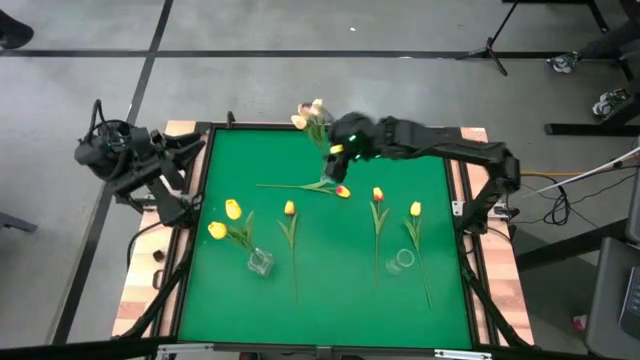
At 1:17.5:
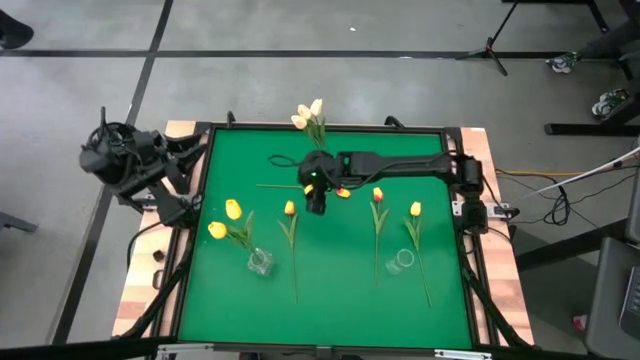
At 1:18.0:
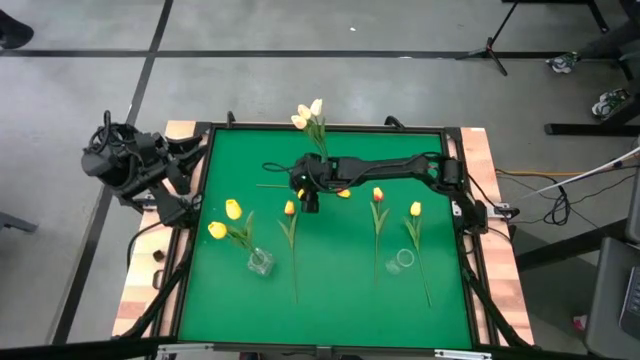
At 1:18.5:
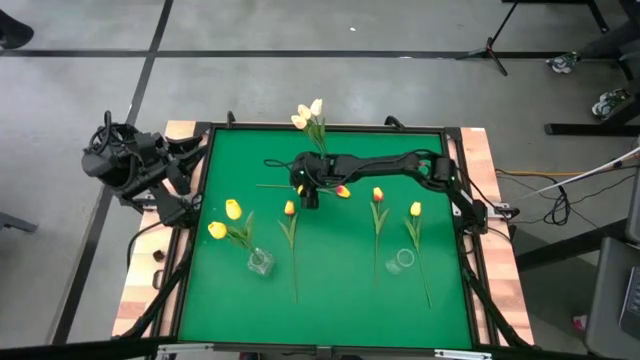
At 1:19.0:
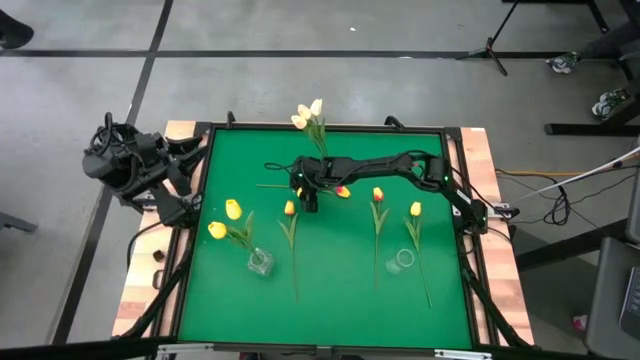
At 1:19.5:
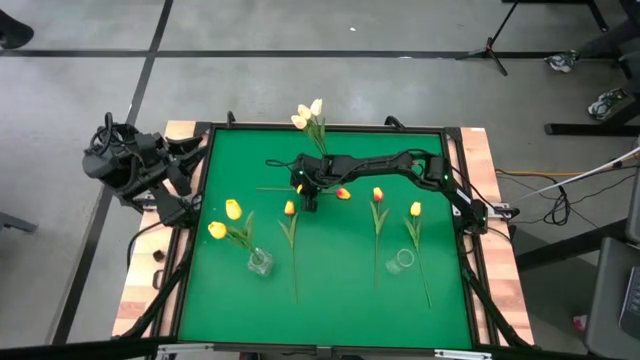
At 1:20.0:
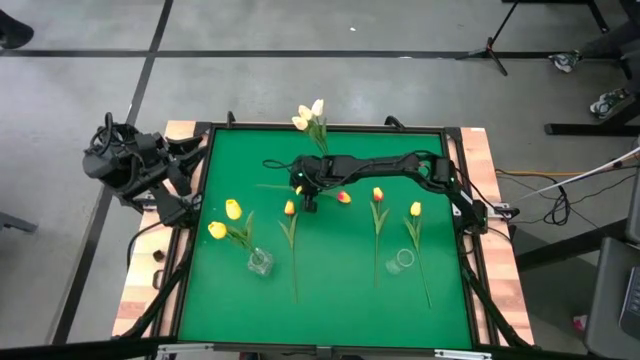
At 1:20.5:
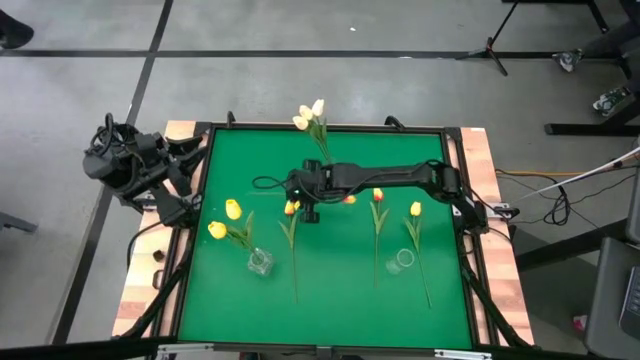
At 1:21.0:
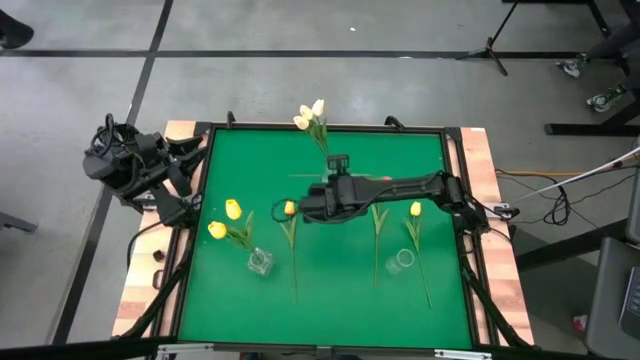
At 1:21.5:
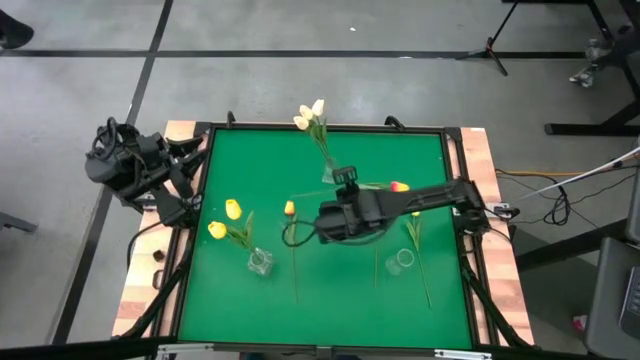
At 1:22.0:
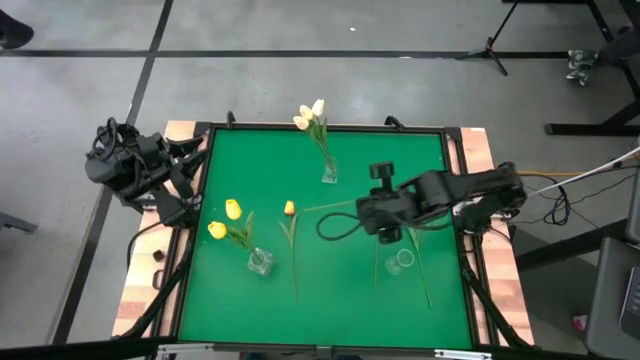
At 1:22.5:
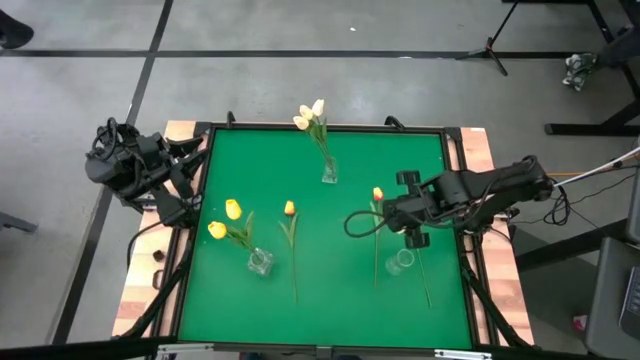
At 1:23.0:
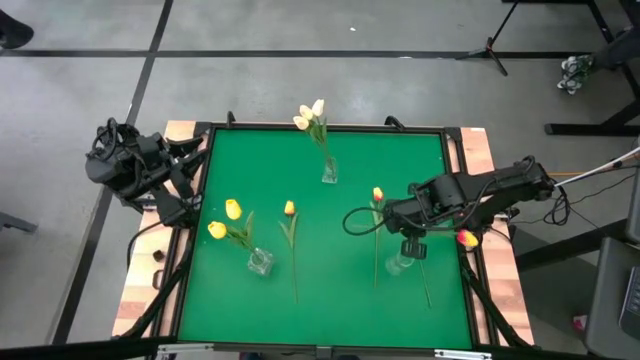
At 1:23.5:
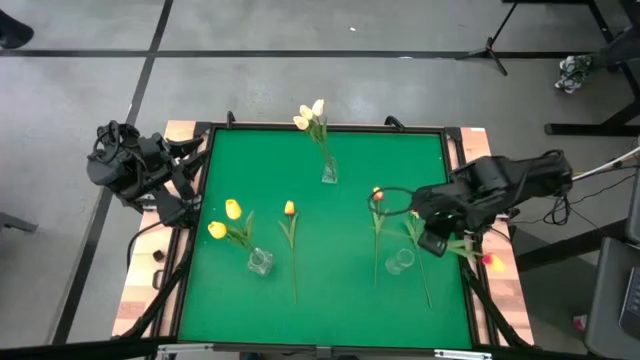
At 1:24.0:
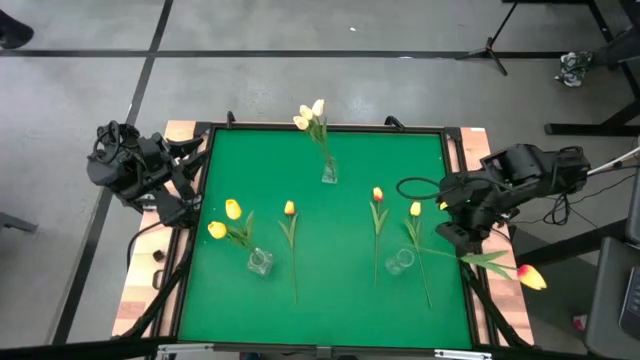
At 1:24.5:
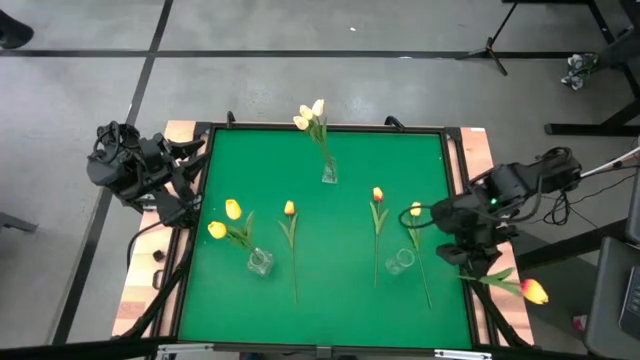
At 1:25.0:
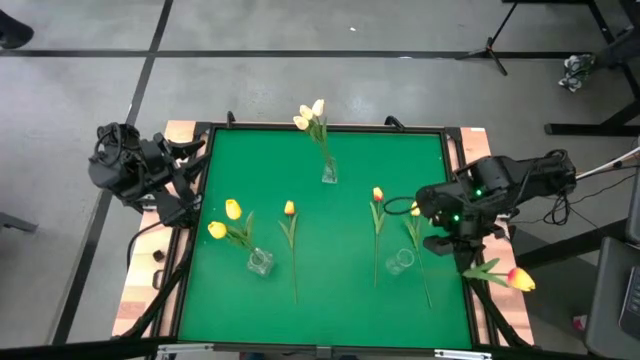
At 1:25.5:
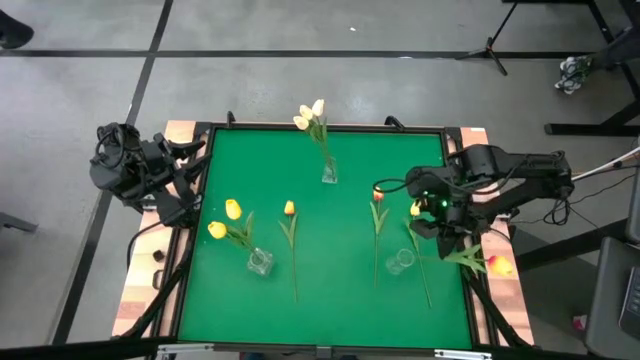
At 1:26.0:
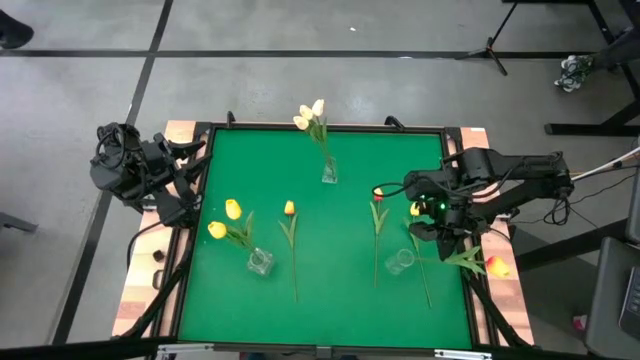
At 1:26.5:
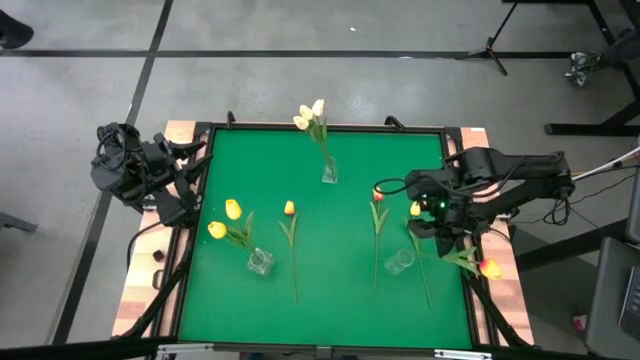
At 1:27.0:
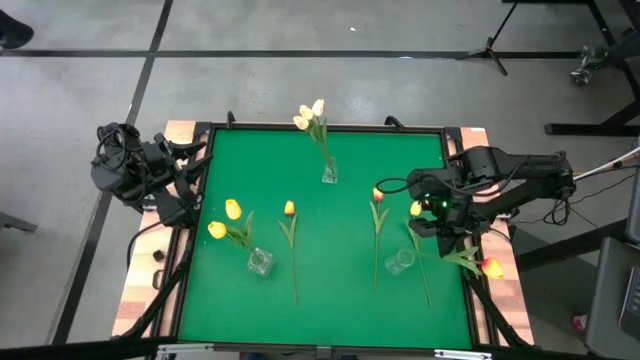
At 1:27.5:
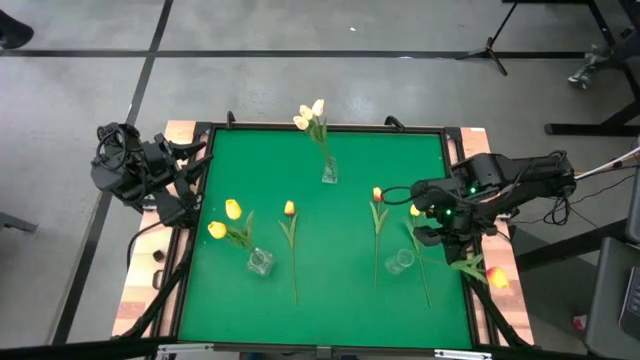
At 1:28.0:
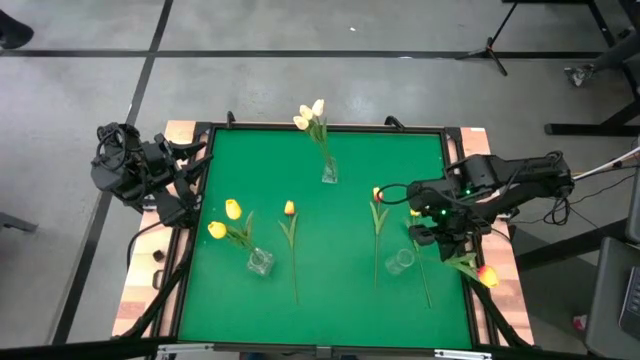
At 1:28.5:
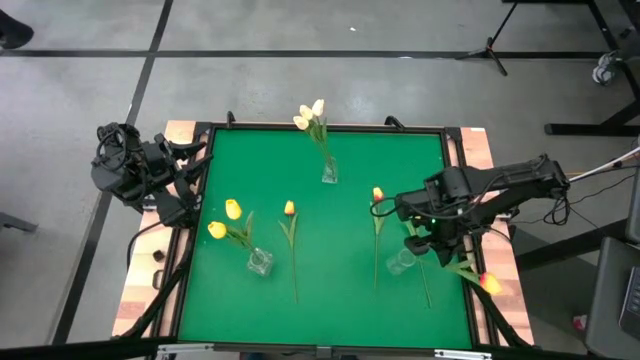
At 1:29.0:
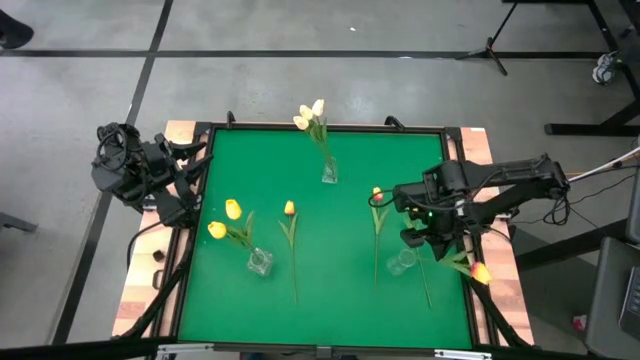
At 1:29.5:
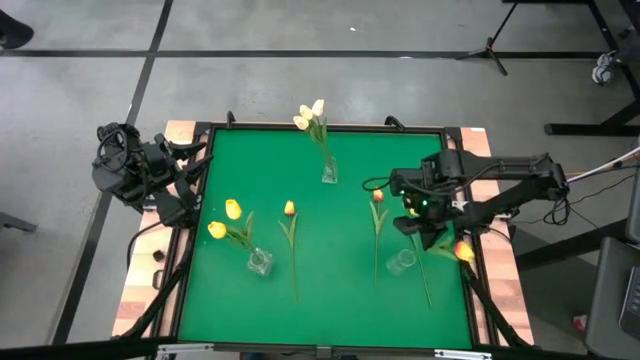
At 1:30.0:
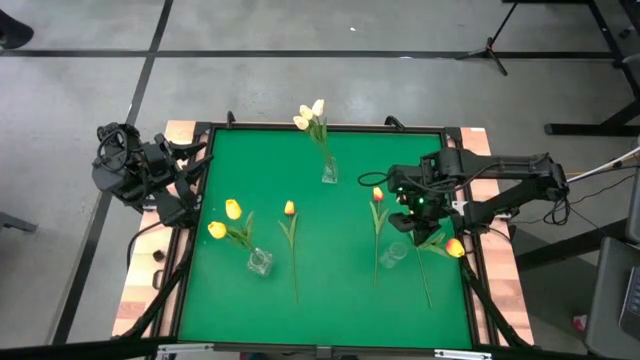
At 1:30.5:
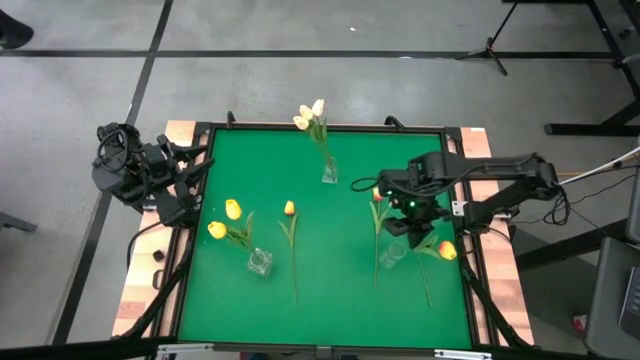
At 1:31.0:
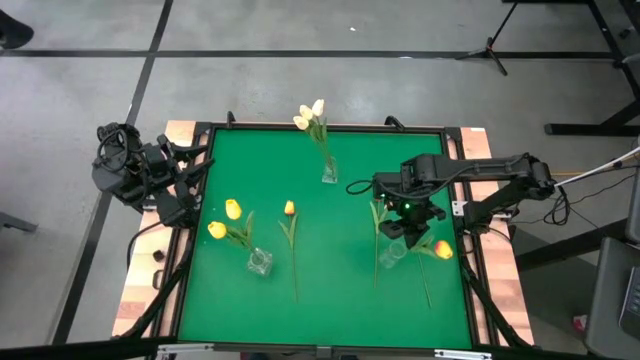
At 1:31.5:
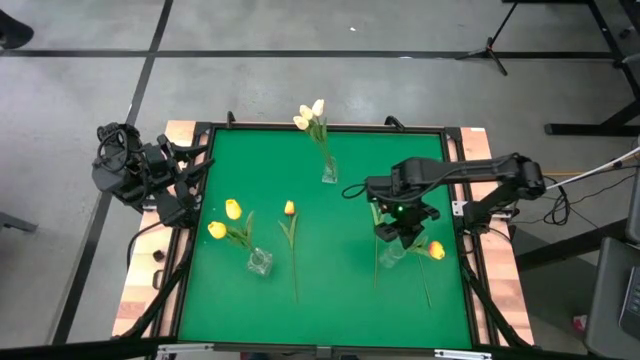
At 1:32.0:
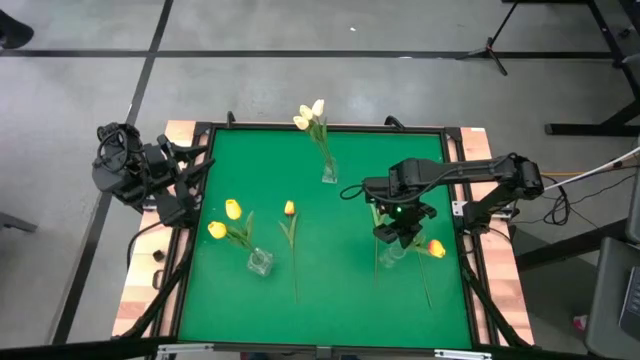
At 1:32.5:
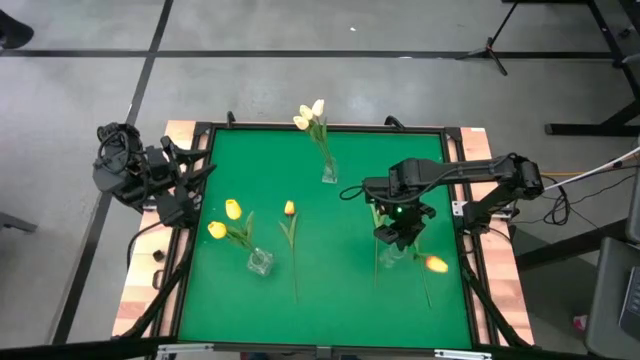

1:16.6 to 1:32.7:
Task: Sort flowers into vase by color
Put the center red-yellow tulip into the bottom right transparent vase

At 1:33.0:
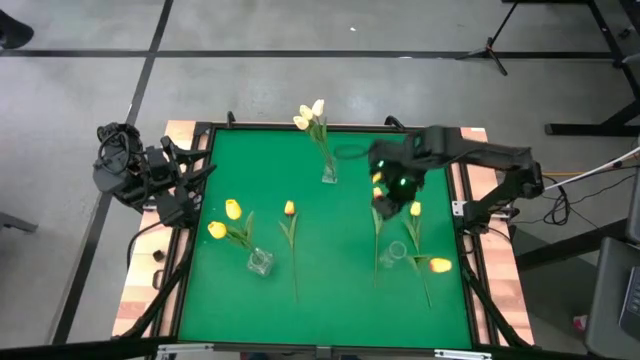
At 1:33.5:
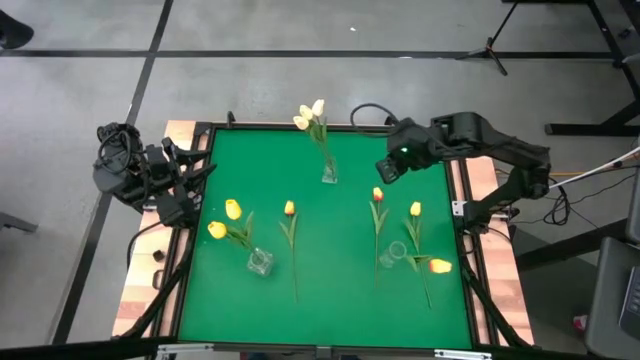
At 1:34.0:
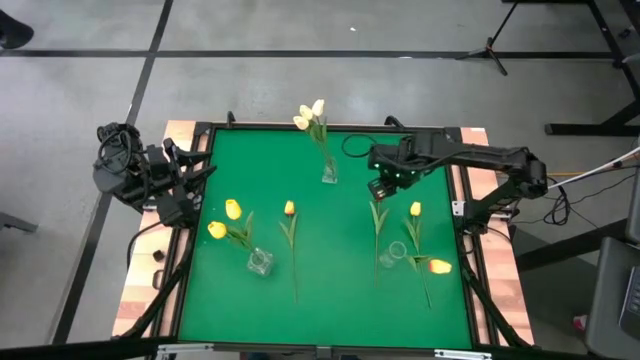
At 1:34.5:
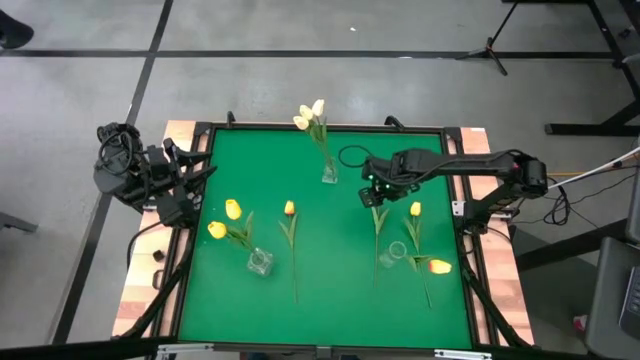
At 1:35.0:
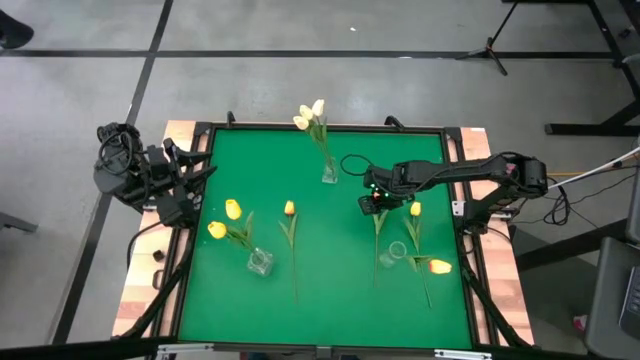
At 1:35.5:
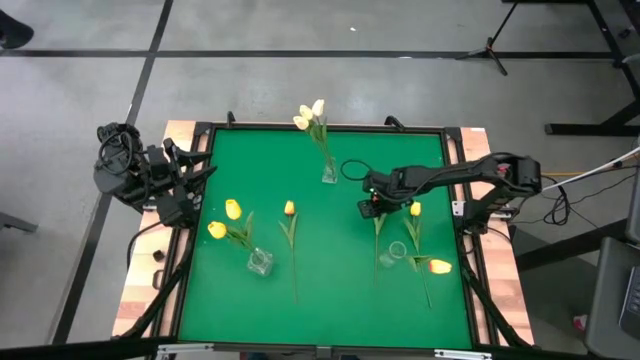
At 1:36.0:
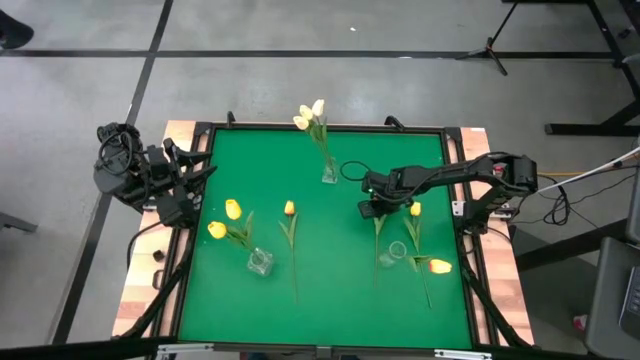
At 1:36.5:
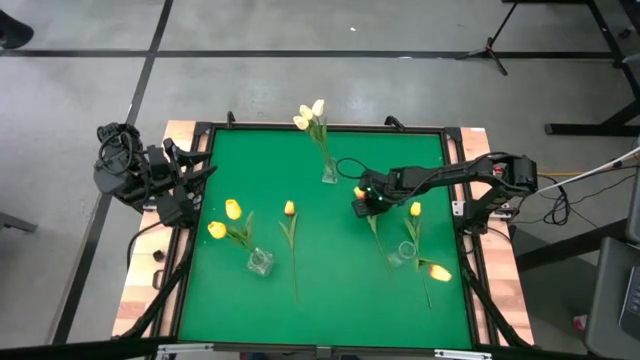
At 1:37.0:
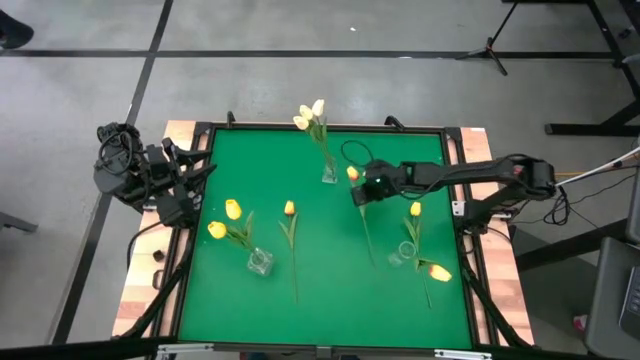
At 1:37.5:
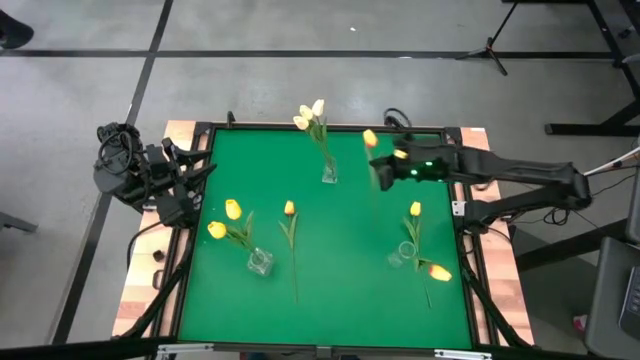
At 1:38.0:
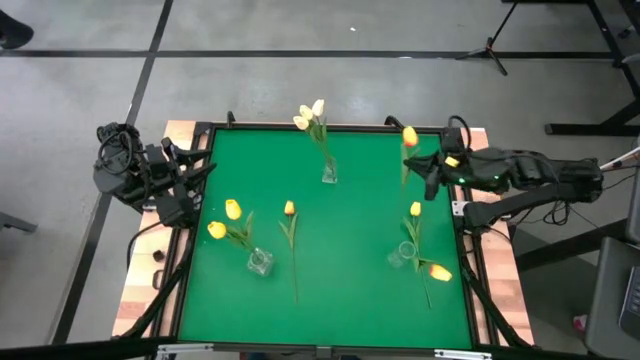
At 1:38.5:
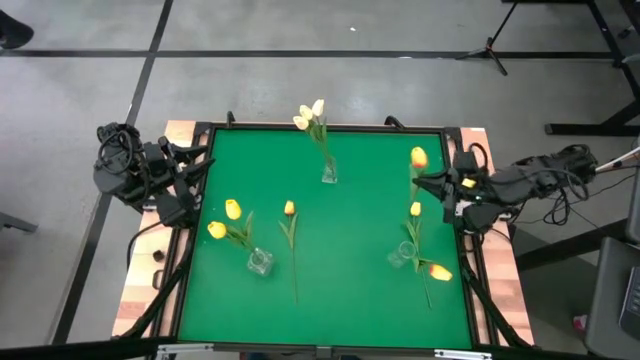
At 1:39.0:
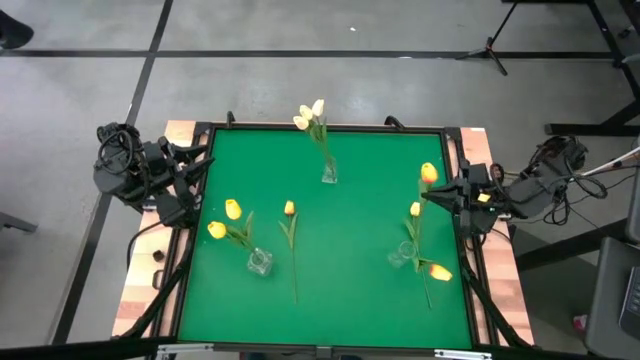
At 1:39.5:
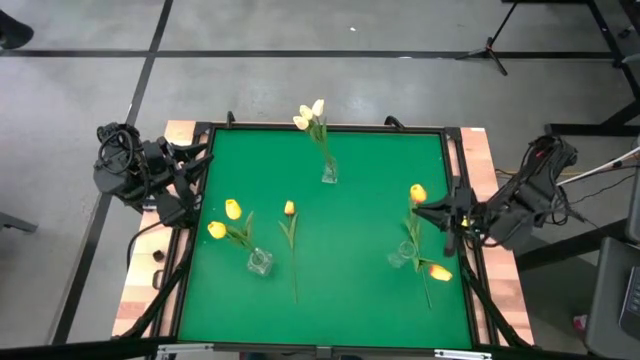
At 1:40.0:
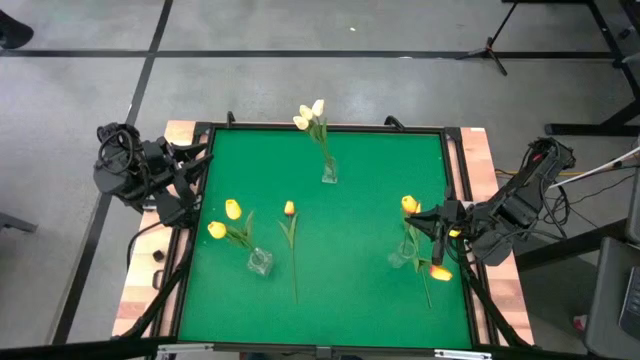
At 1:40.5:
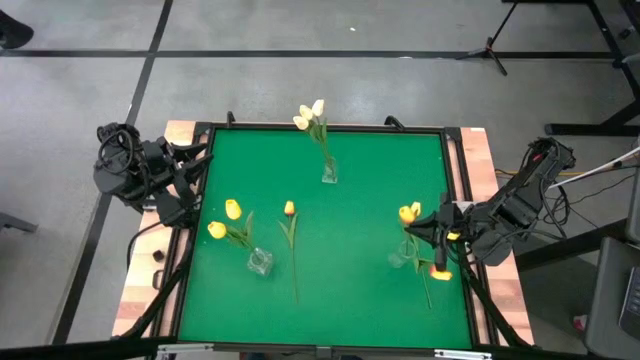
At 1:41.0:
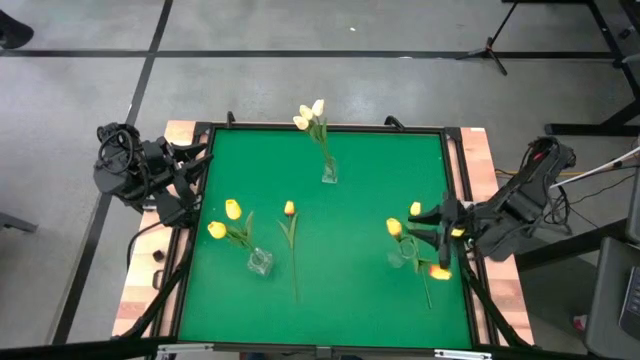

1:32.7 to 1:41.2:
Put the right red-yellow tulip into the bottom right transparent vase
